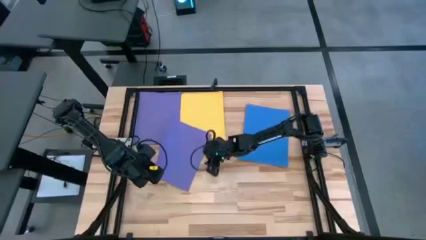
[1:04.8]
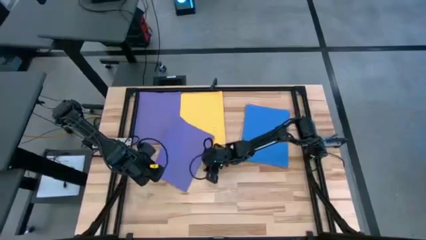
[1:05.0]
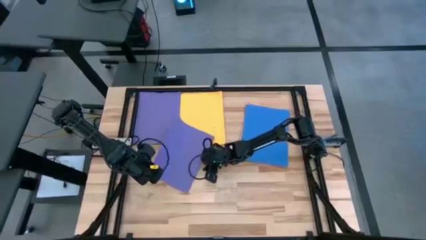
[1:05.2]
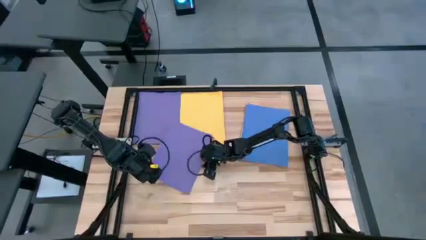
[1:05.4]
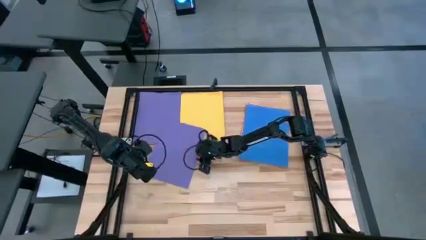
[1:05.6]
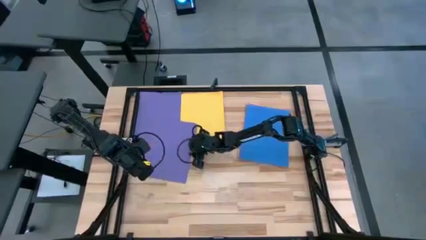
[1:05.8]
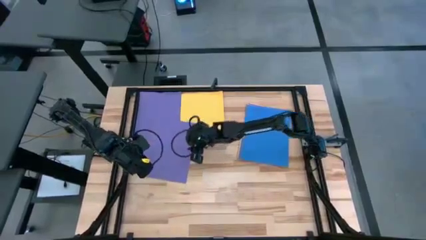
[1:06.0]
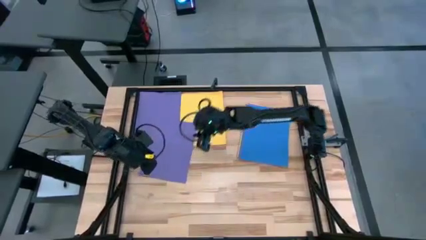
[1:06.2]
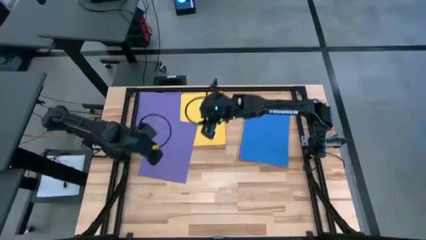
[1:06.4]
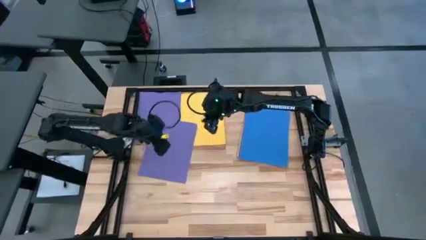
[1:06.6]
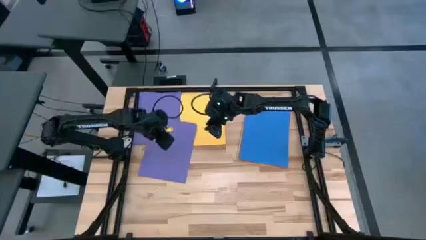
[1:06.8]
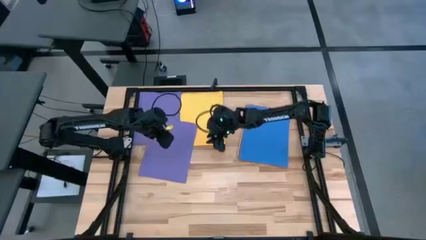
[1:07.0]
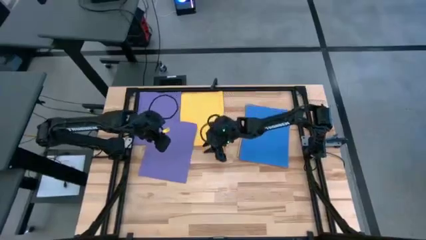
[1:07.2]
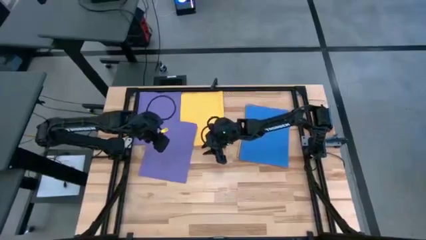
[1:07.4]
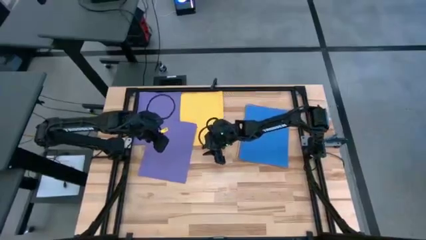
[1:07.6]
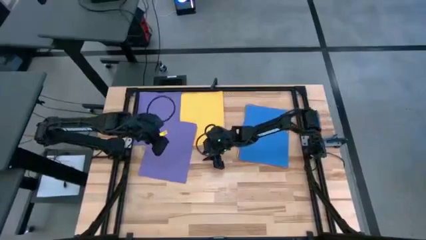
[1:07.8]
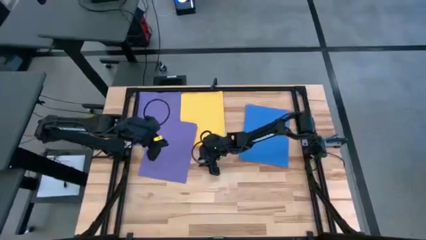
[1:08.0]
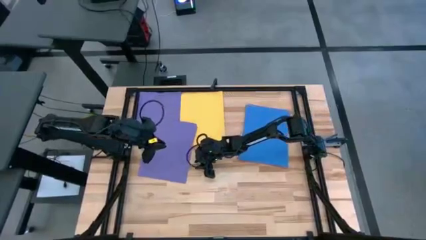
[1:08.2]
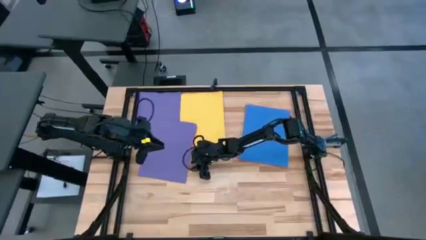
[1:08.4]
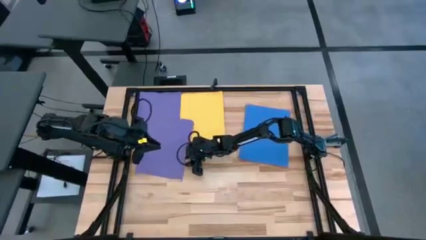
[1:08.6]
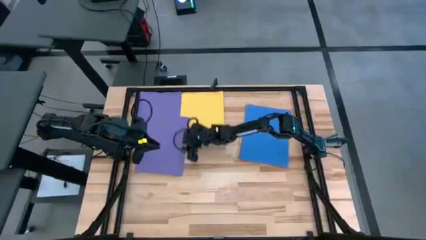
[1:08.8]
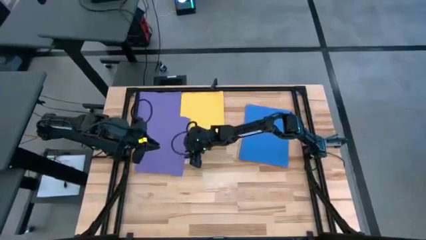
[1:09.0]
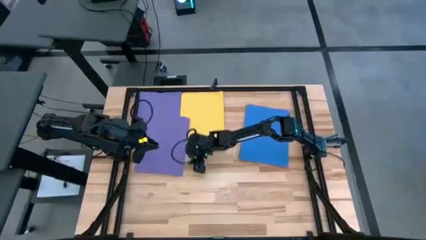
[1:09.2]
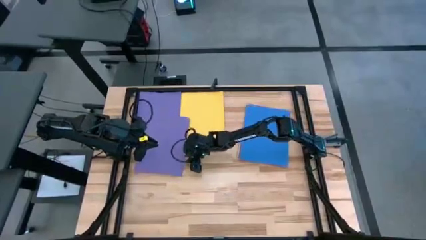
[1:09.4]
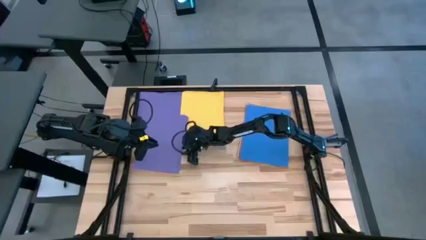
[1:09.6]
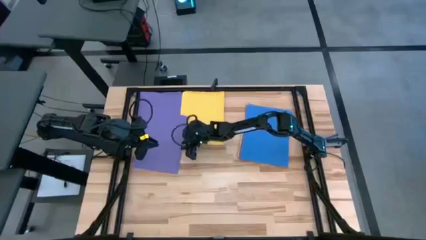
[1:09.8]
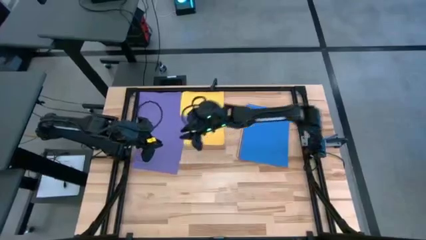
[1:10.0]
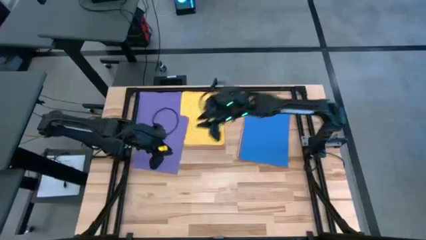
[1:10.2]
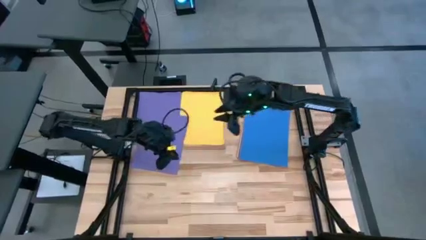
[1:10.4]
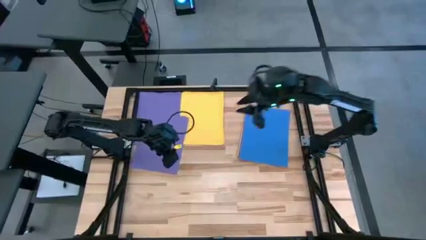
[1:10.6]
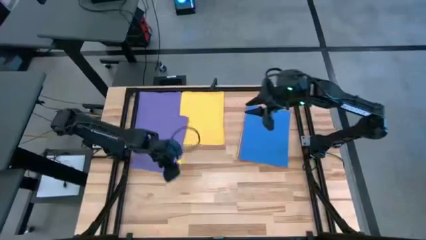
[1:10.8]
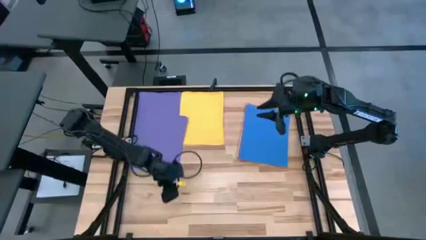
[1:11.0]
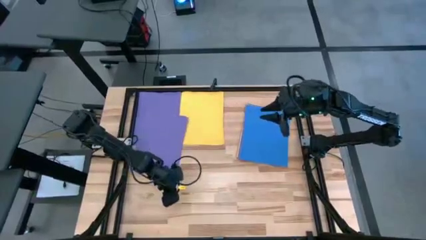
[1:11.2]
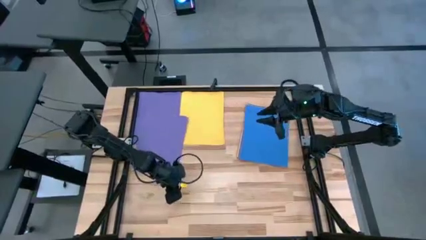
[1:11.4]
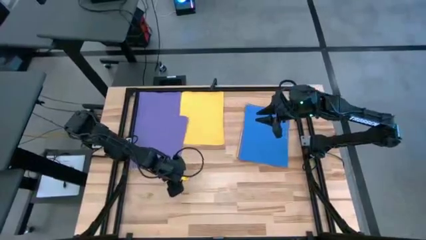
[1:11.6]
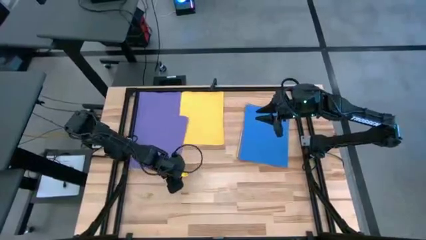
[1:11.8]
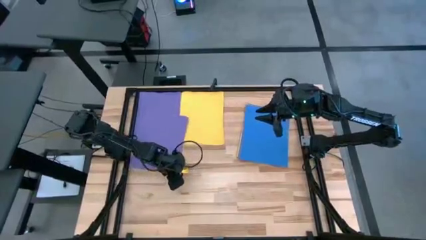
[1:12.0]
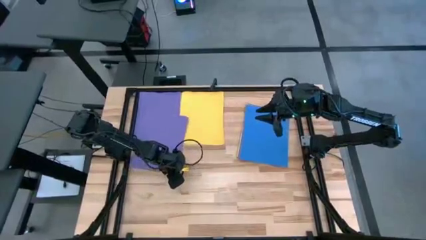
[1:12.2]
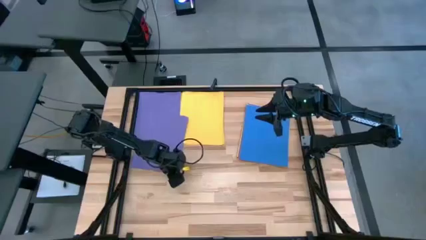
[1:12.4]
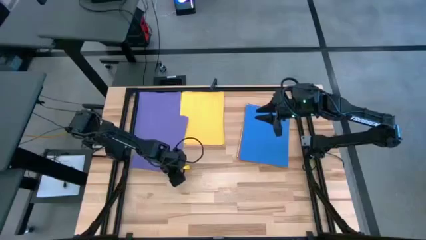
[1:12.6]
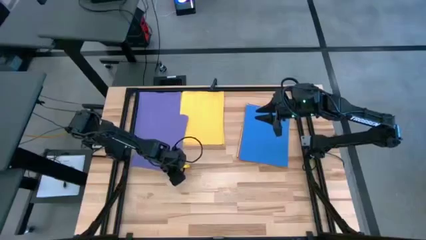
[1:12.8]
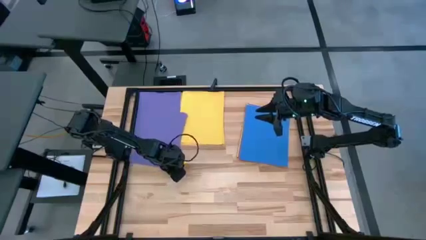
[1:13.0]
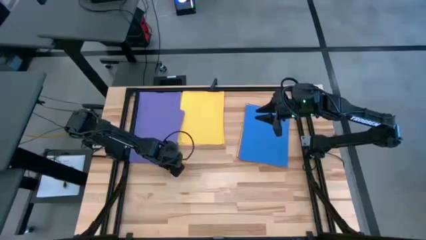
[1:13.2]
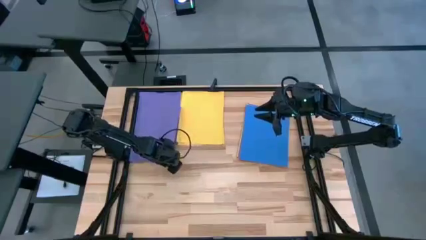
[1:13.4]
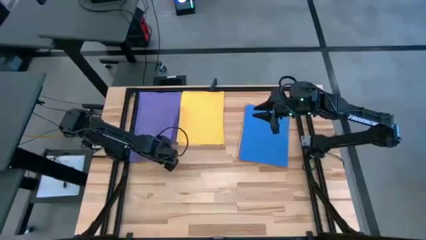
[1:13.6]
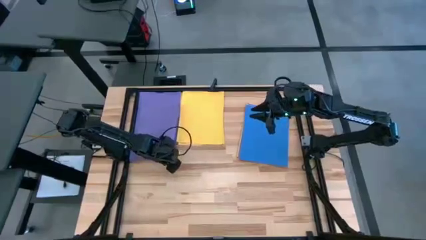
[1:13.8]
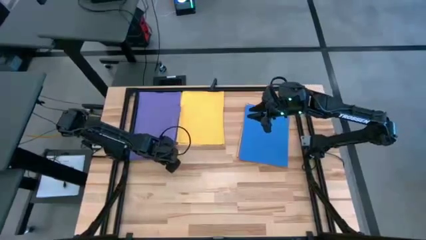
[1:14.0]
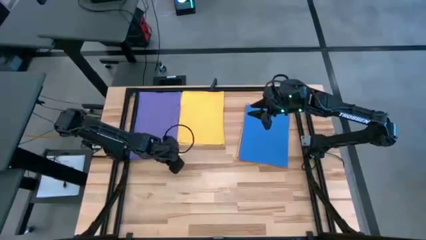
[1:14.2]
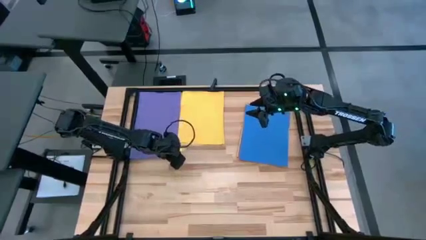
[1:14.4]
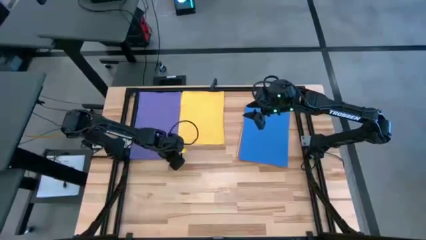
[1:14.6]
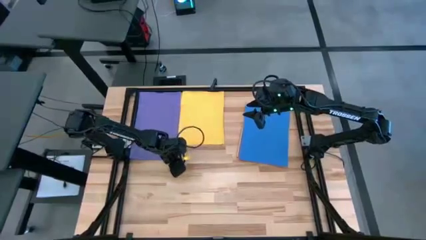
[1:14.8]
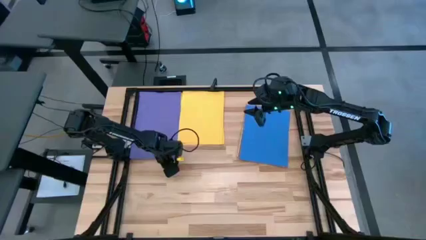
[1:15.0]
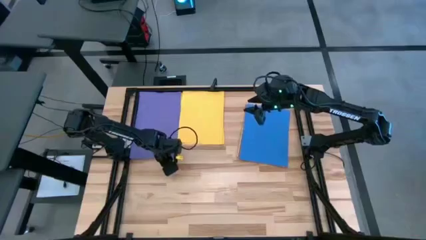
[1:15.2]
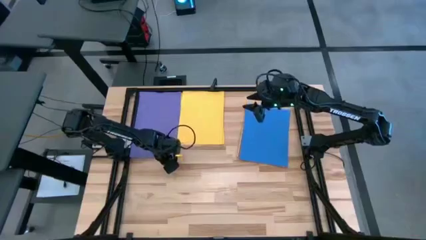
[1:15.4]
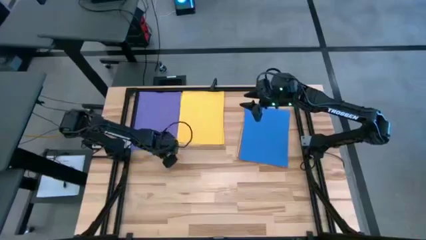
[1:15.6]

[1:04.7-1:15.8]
Task: Organize paper
Stack the purple paper on top of the purple paper

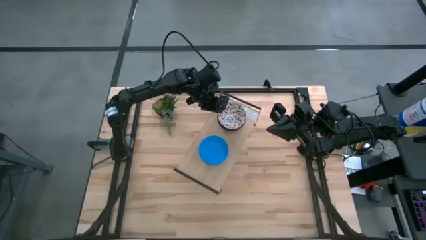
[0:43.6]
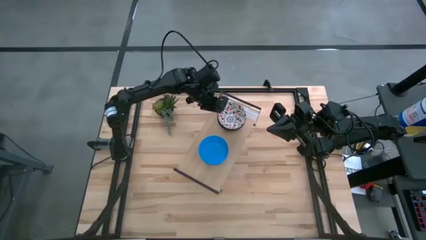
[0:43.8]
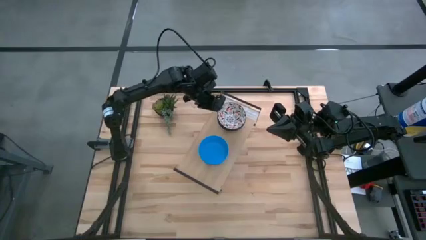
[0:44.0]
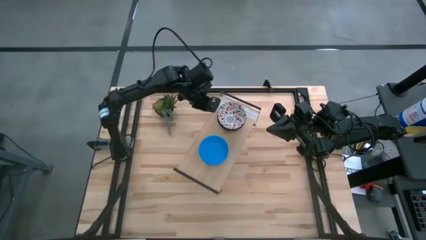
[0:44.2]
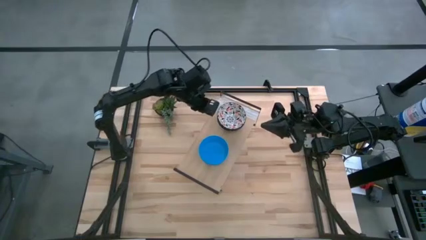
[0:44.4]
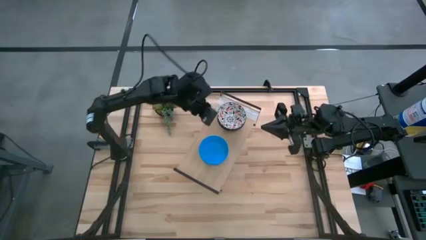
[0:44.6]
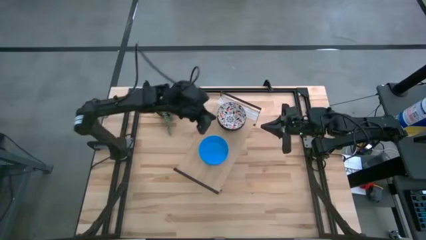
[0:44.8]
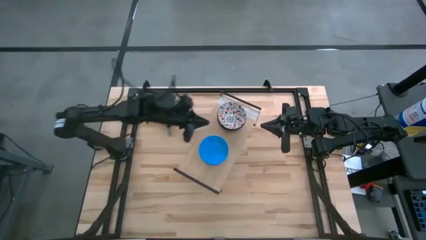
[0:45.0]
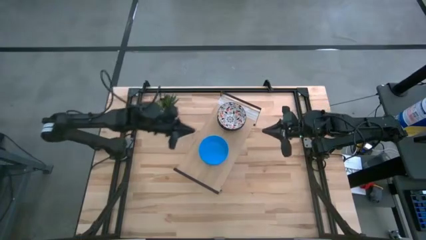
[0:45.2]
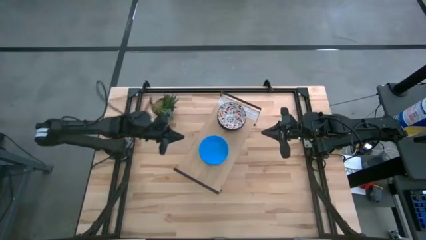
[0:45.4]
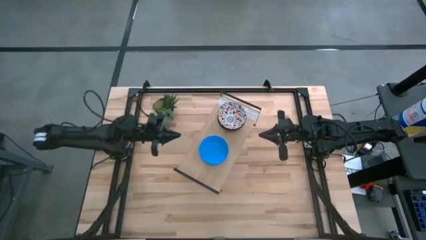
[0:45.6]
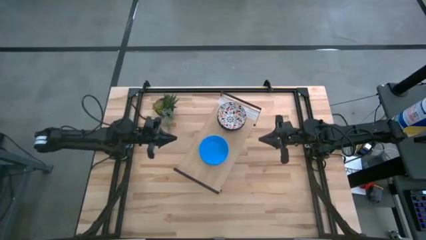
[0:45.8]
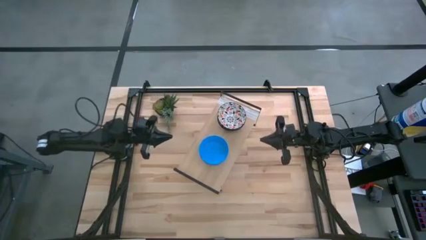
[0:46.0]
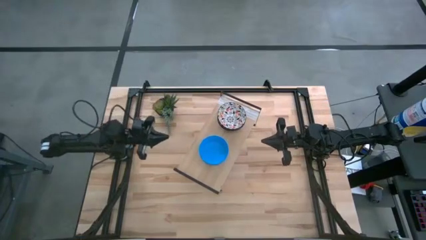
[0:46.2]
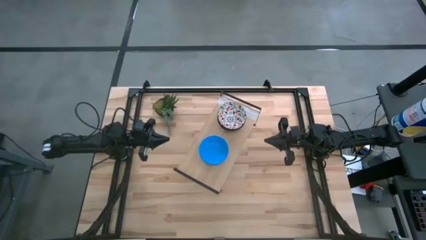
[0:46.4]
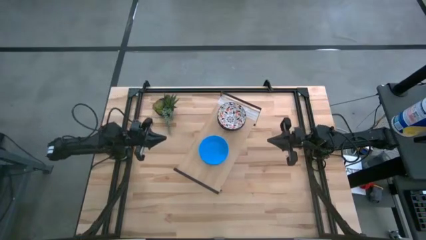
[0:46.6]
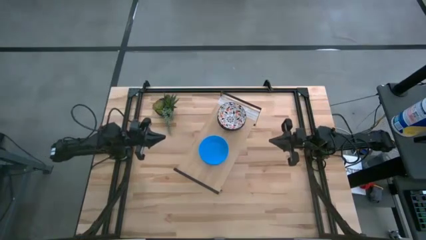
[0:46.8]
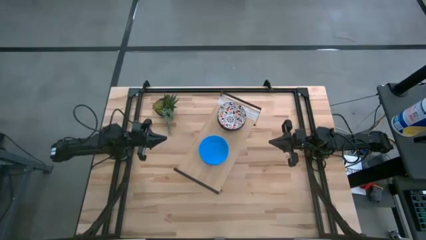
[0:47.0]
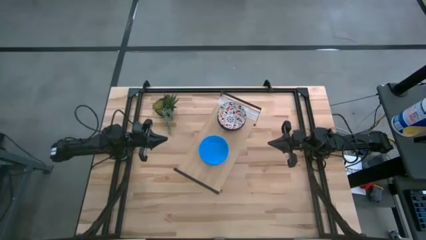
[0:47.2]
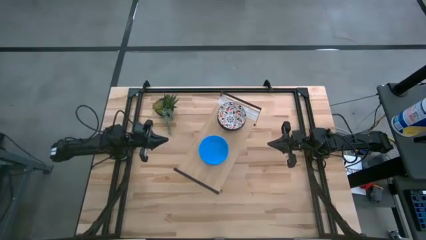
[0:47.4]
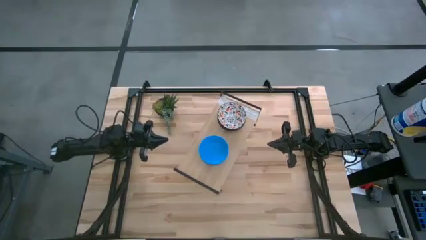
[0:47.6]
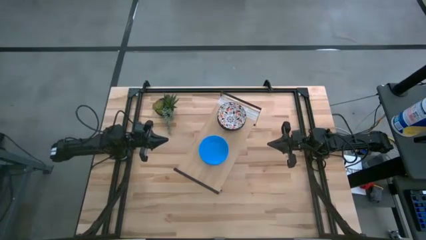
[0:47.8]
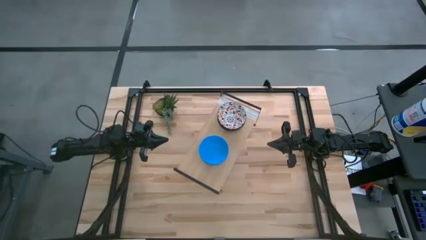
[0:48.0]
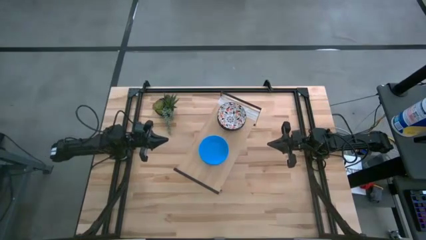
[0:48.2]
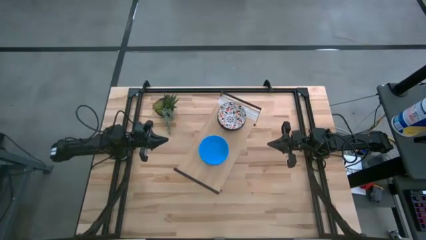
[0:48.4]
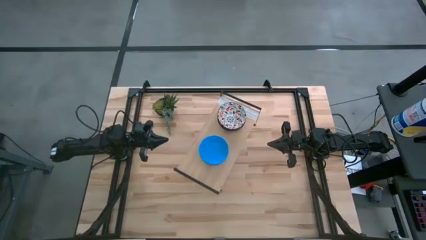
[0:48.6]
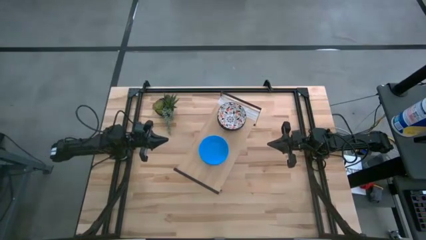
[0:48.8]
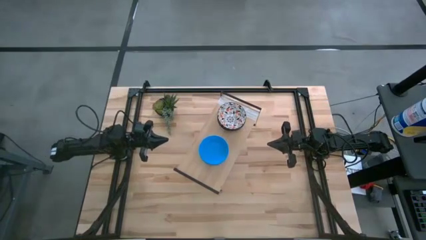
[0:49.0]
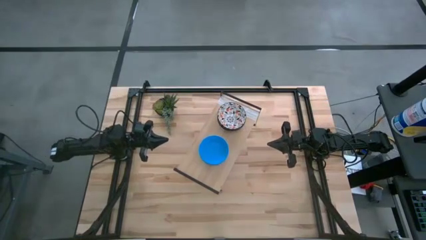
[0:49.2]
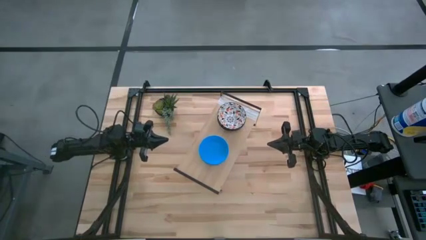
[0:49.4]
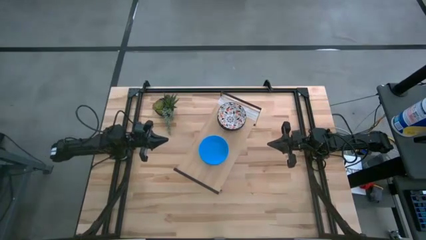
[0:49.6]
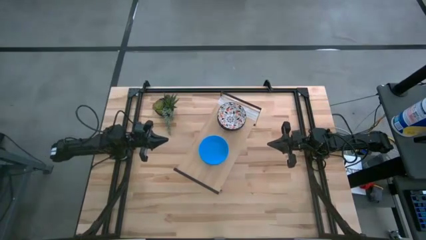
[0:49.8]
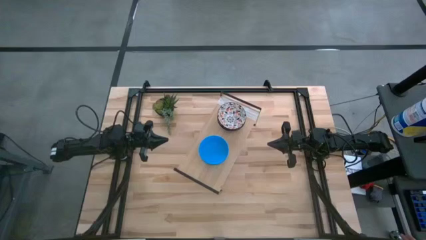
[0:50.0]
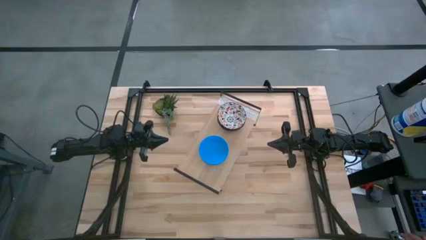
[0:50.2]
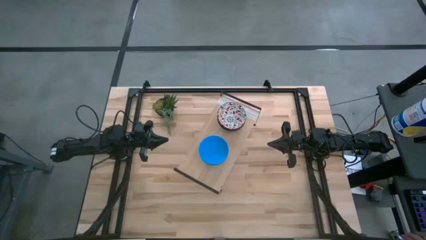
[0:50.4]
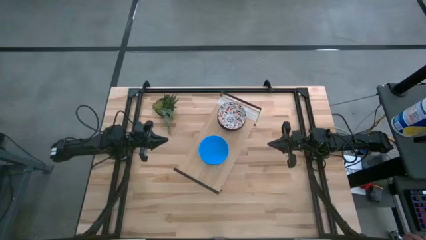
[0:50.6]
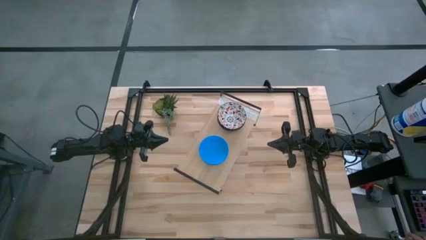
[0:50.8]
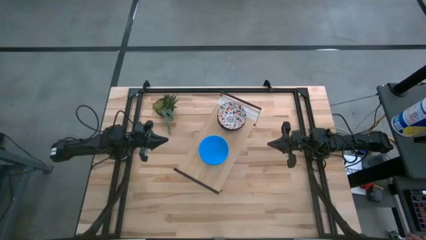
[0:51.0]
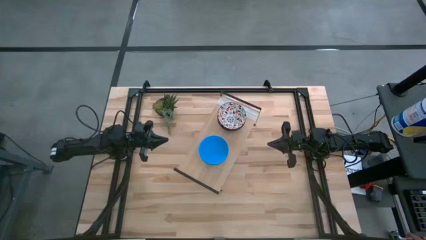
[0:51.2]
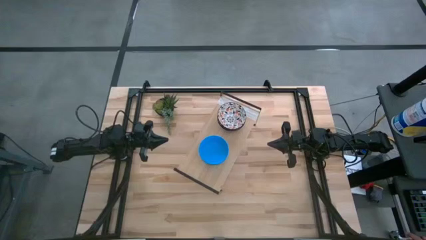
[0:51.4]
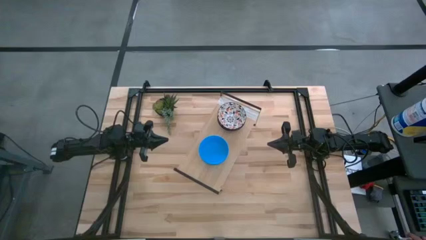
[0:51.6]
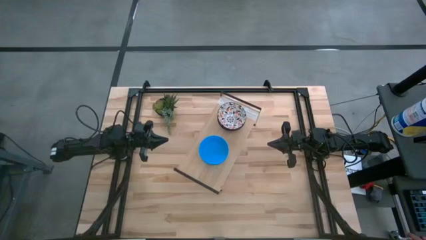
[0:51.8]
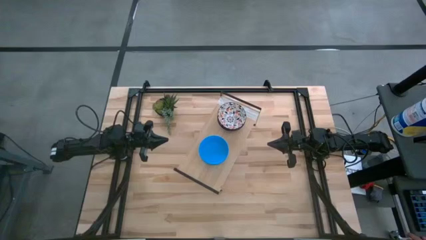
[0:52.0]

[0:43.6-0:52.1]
Task: Pick & Place Mini bowls
Return to Home Position
